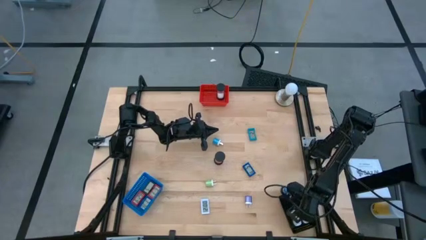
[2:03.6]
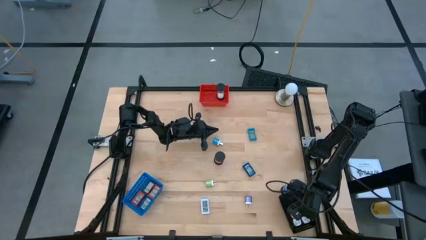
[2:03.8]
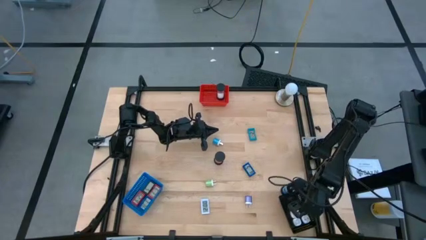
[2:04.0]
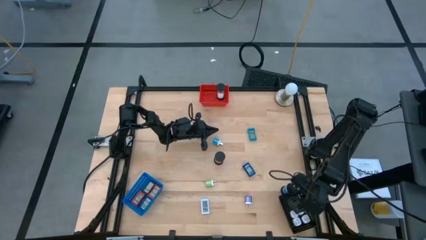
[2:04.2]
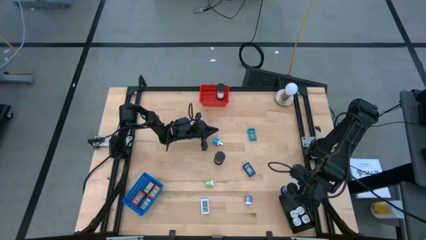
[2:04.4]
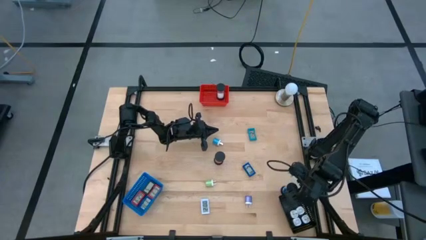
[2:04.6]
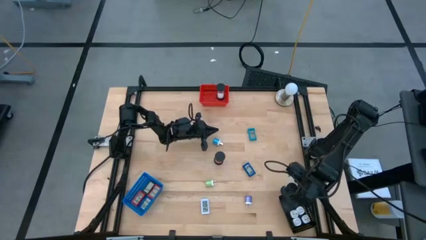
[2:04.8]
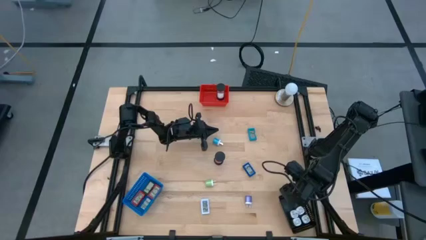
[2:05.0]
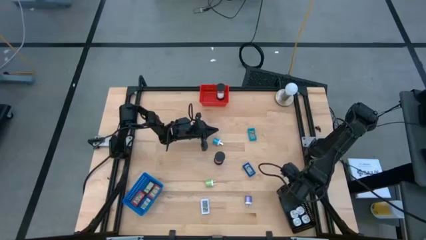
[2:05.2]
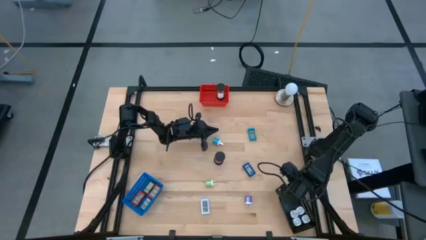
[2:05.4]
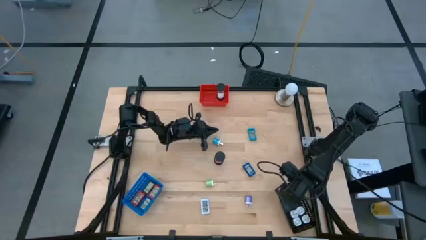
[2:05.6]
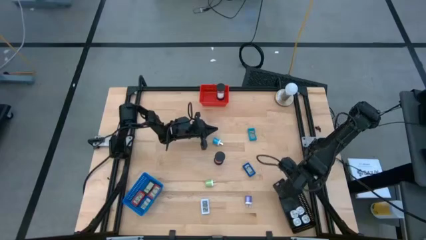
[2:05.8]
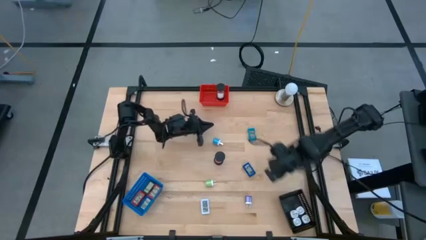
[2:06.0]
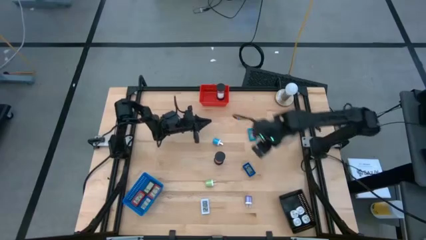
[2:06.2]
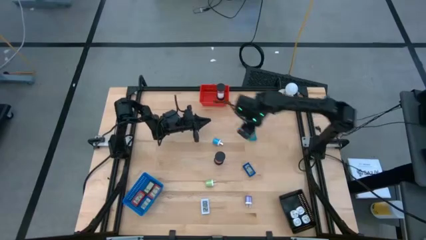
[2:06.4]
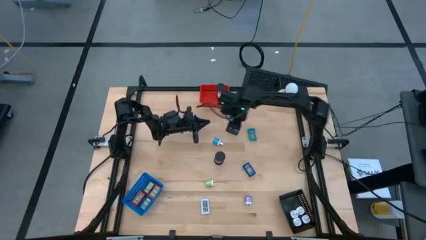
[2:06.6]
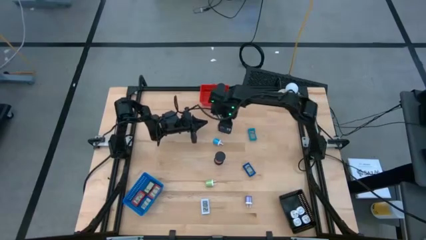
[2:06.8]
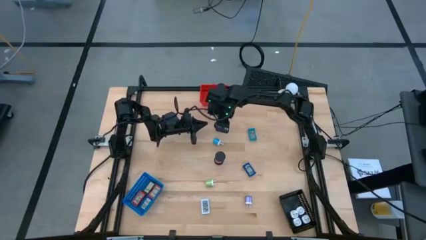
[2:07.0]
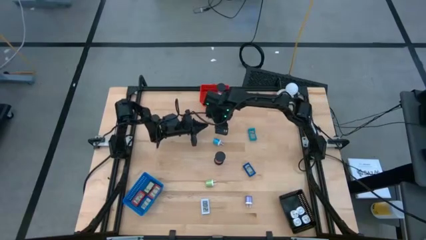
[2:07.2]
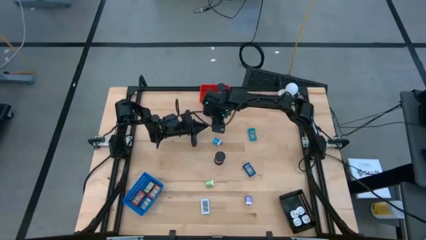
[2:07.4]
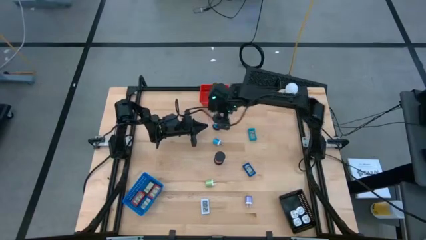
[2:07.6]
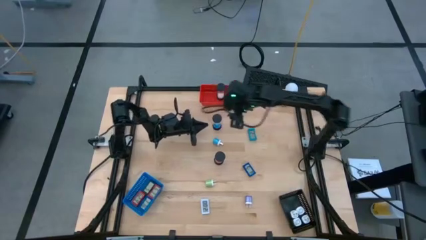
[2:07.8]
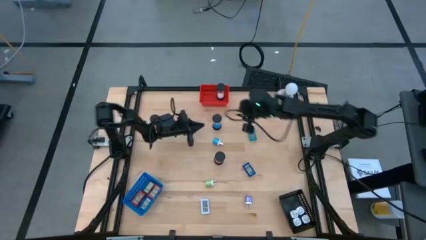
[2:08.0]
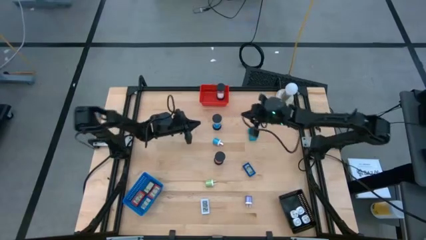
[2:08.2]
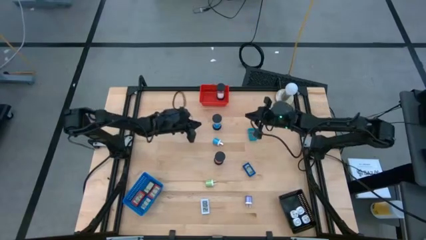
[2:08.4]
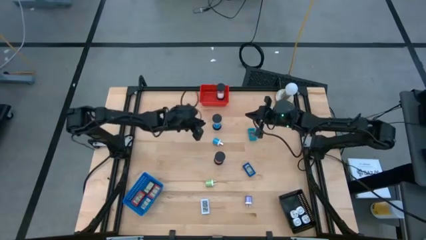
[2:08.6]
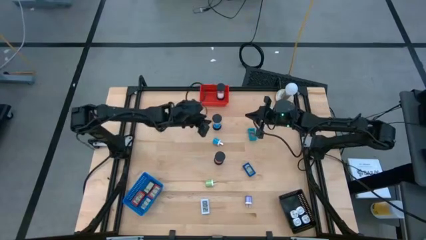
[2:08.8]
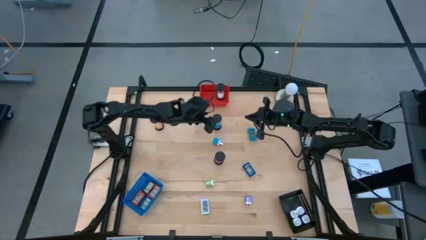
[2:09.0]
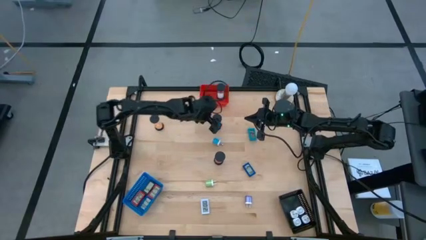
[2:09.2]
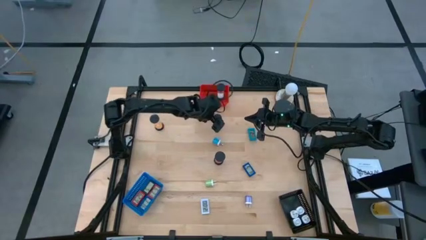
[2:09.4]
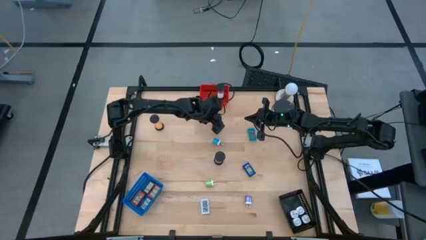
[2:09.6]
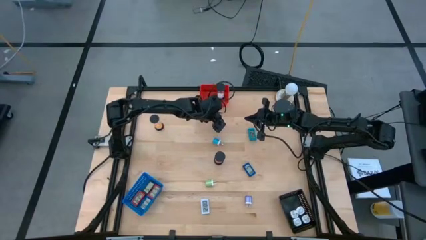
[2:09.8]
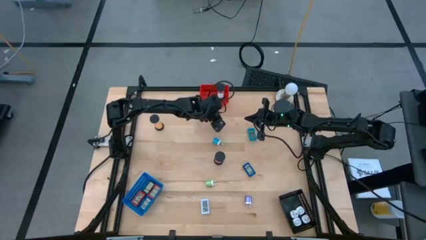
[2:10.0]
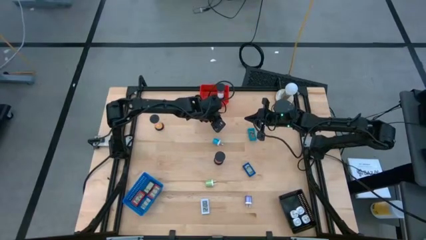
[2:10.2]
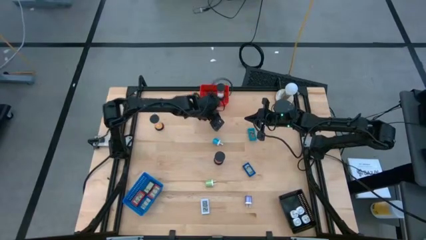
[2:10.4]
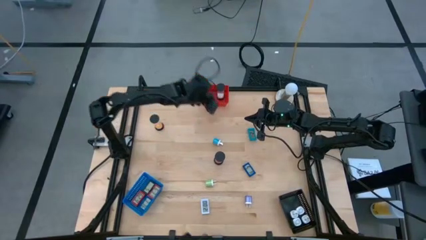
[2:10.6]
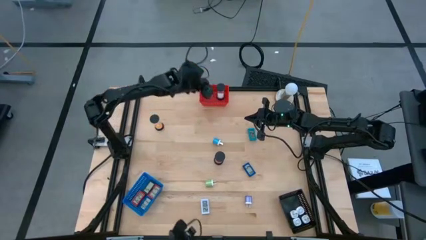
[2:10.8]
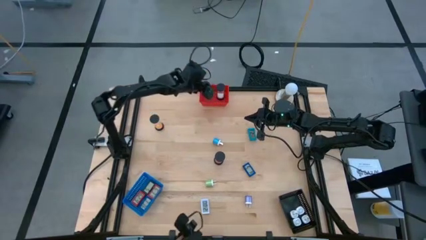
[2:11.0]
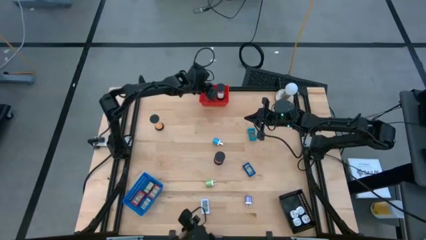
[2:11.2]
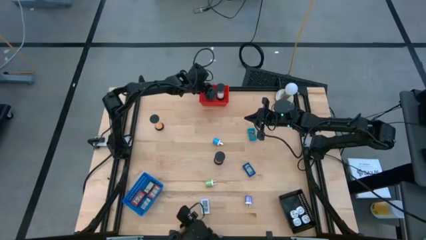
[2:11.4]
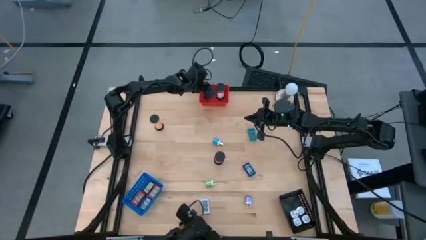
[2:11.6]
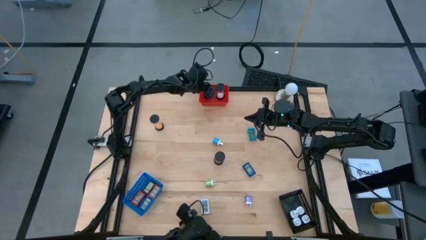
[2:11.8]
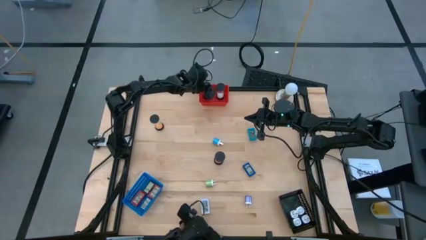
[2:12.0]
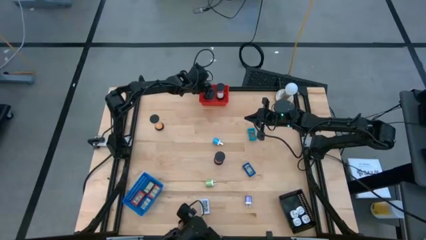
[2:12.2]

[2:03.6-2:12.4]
Task: Pick & Place Office items
Put the blue hourglass into the red bin

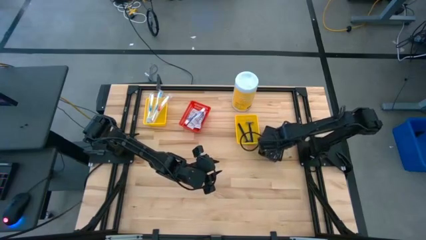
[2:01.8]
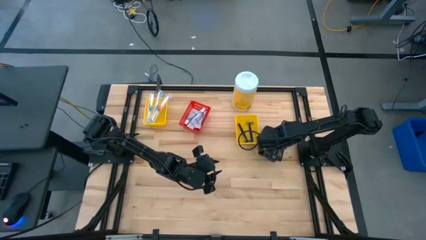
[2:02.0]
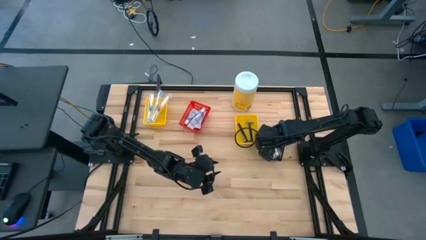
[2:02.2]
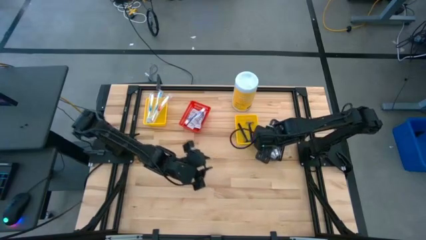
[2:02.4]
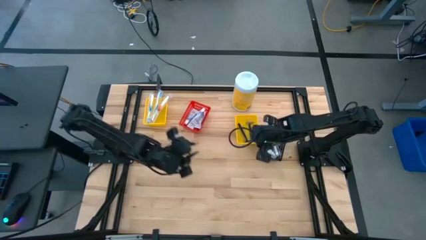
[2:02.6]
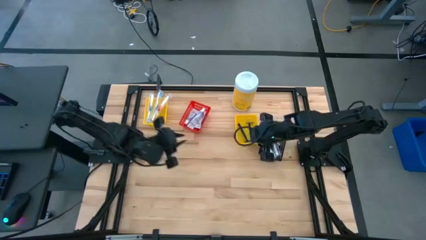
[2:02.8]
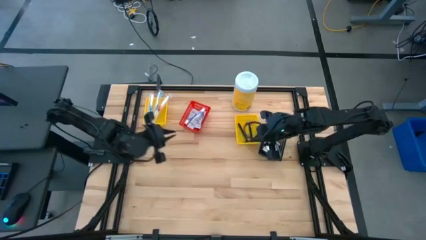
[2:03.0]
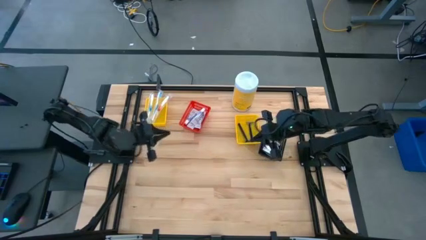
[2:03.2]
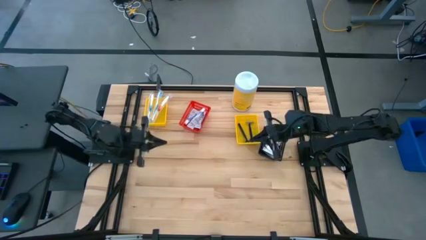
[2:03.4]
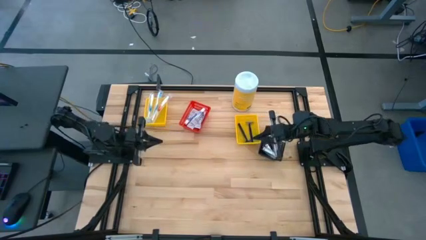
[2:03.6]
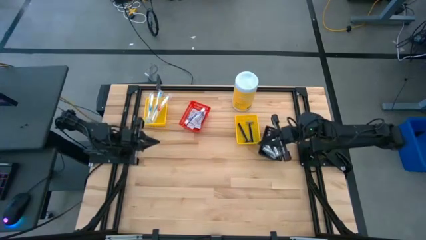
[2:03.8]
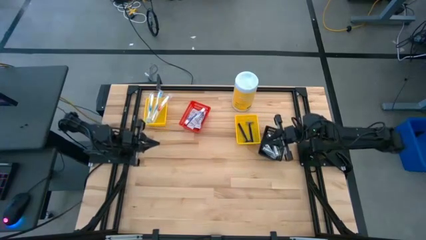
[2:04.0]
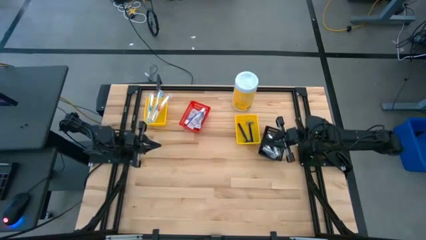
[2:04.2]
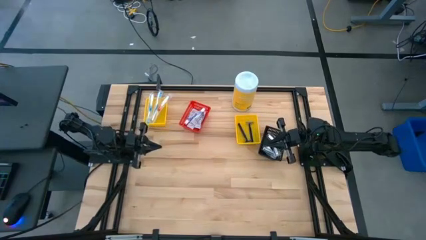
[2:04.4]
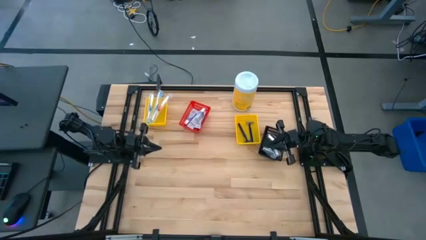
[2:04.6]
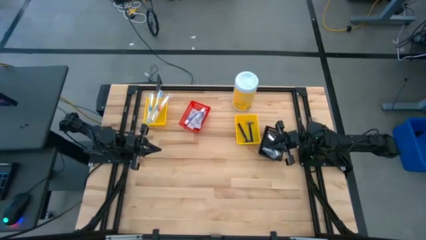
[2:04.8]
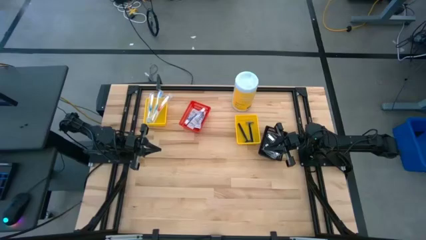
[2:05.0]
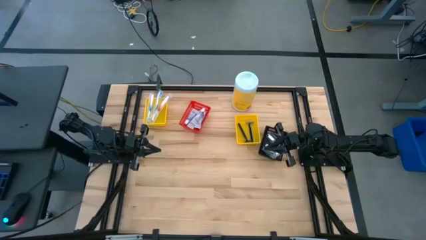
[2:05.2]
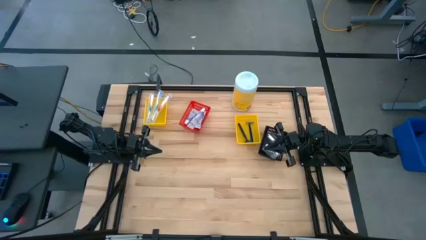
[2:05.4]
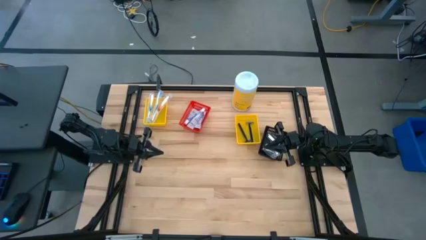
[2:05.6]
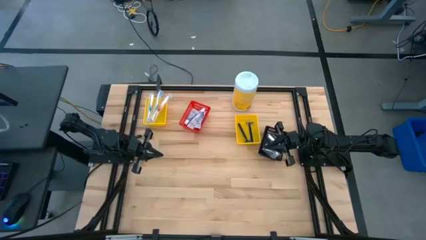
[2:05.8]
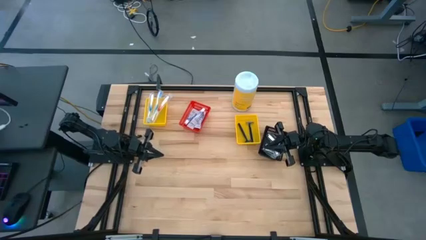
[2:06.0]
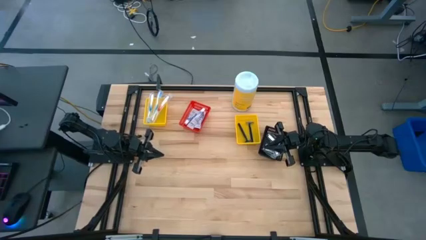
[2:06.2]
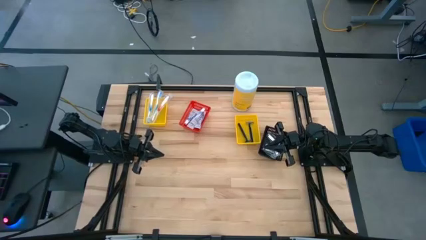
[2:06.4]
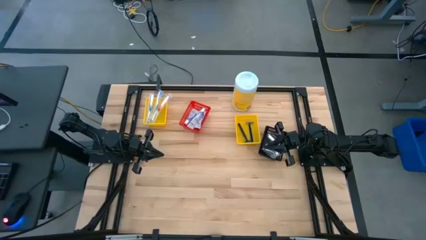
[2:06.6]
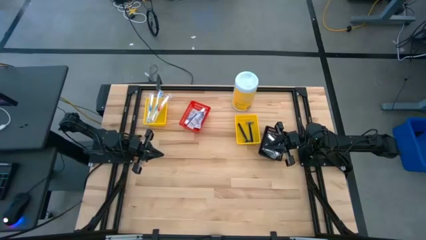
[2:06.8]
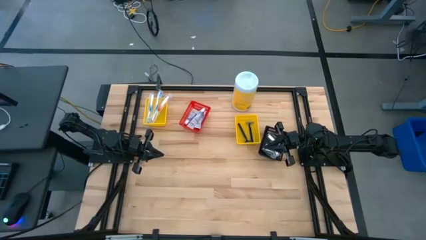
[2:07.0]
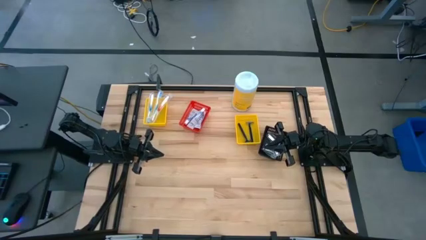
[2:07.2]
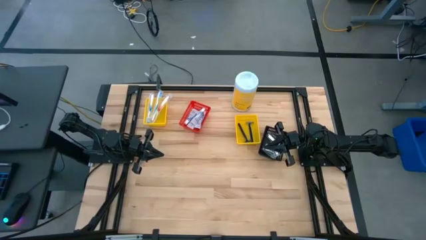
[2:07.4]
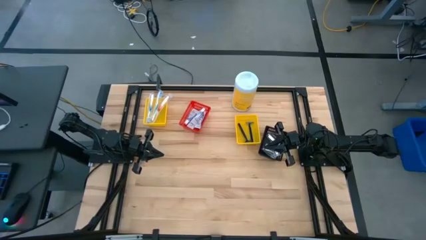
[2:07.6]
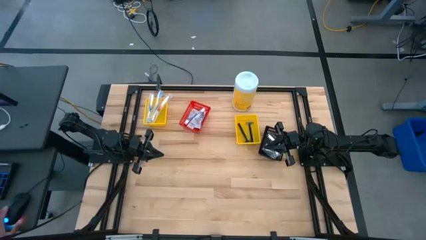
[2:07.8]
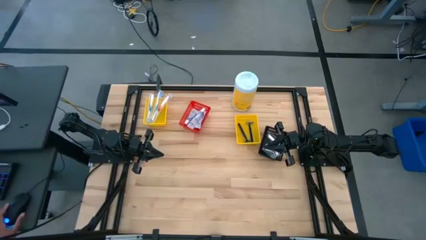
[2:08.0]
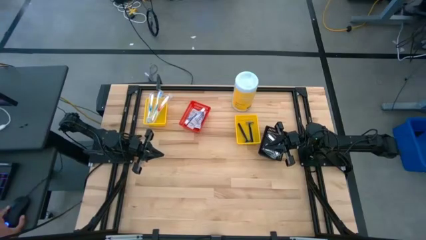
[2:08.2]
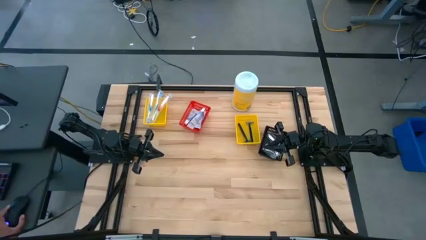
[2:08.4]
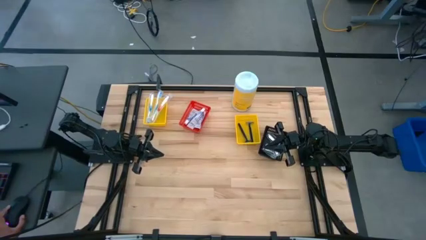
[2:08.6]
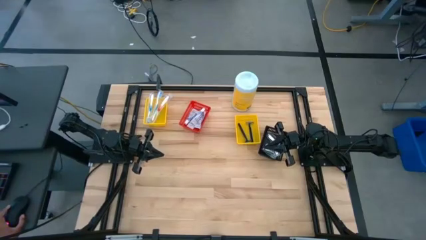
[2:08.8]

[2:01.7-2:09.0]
Task: Pick & Place Travel size toiletries
Return to Home Position
